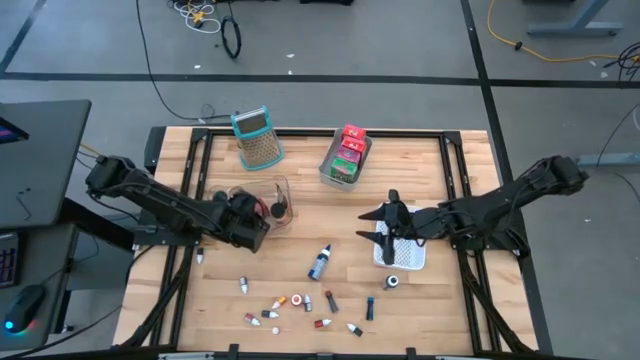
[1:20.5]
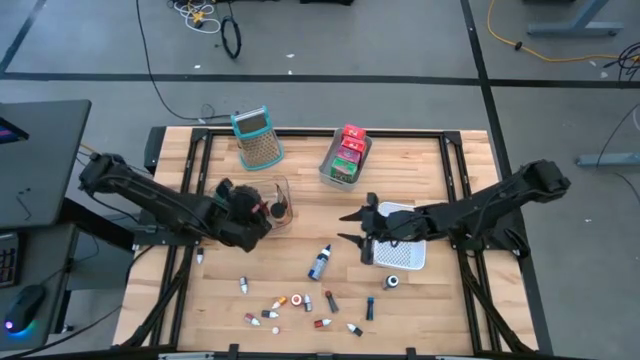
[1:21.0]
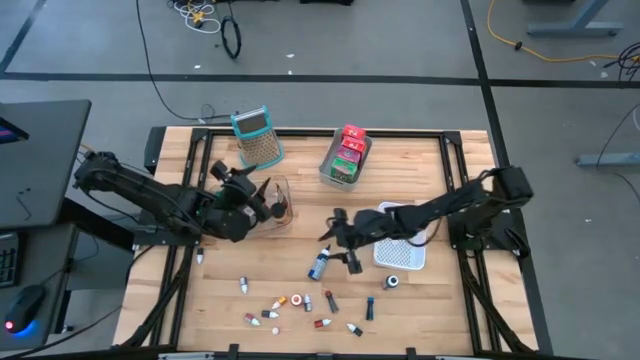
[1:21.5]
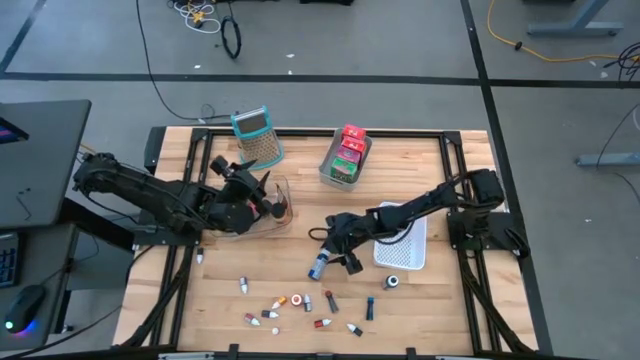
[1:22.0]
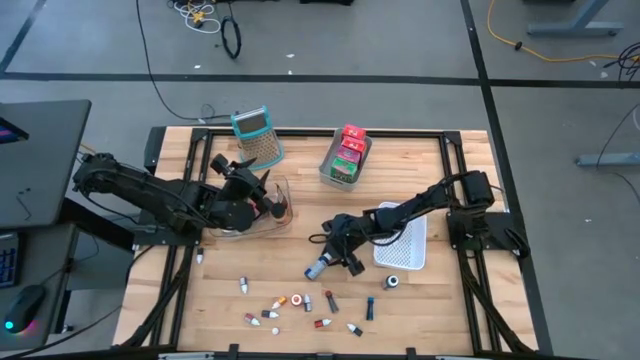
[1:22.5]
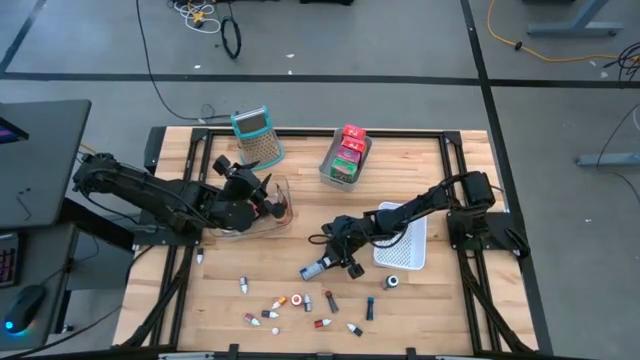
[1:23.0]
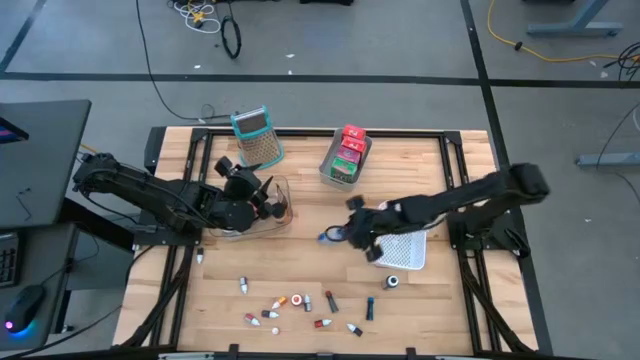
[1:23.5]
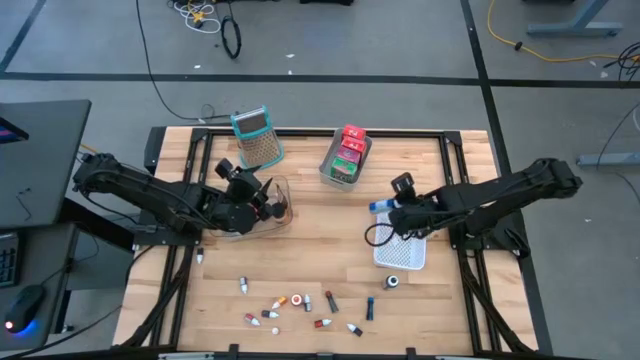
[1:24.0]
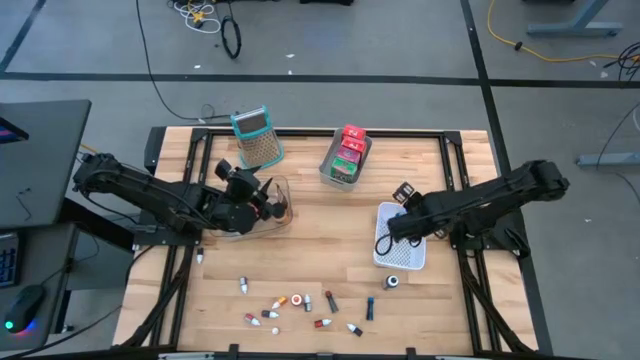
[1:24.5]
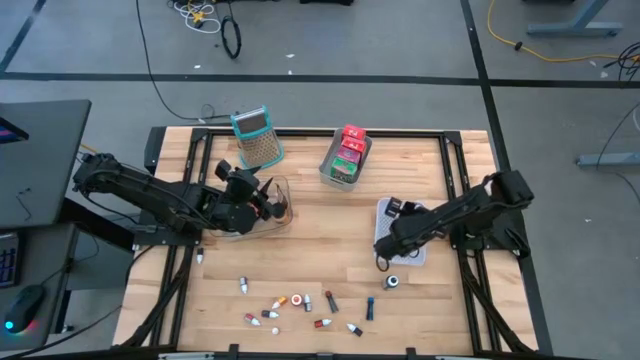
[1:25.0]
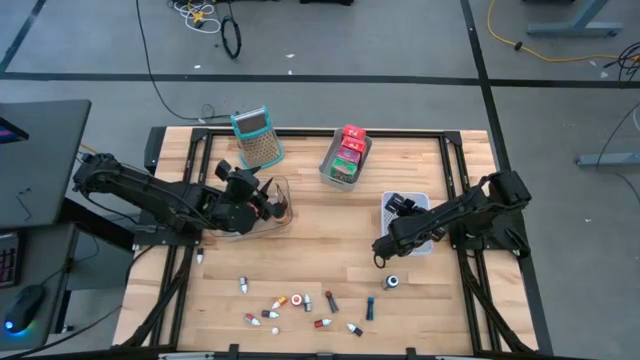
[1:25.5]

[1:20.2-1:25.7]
Task: Pick & Place Kitchen Items
Put the blue food coloring bottle into the white bin

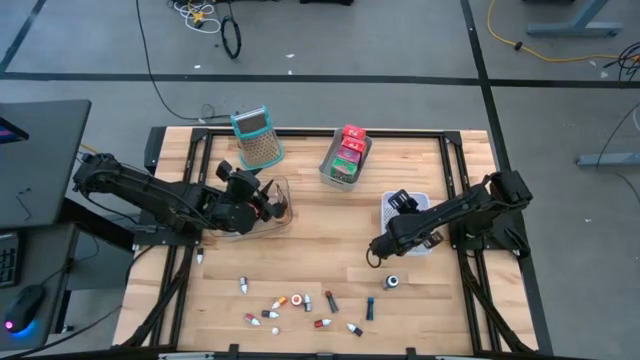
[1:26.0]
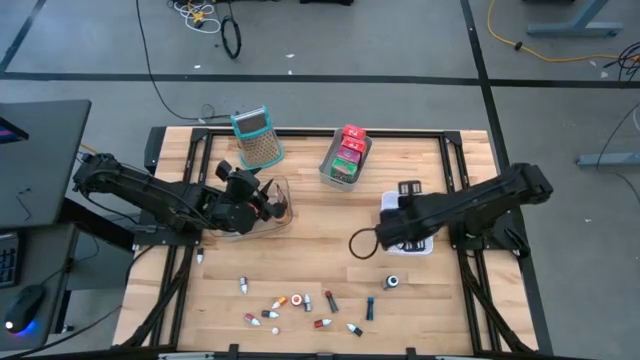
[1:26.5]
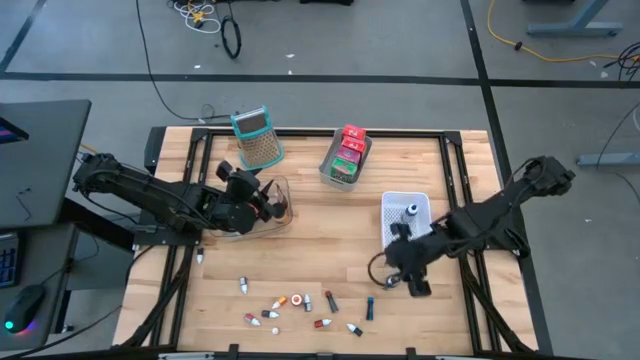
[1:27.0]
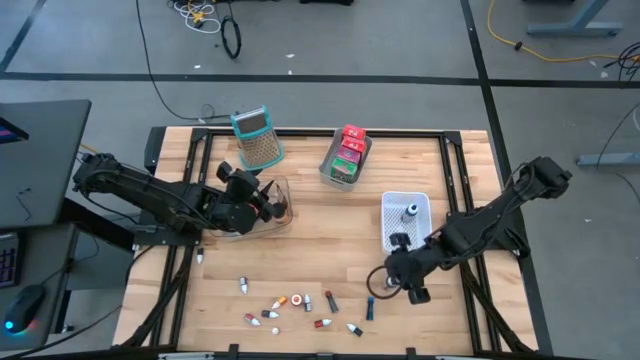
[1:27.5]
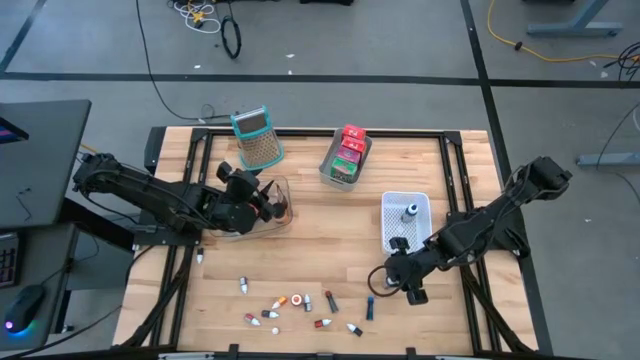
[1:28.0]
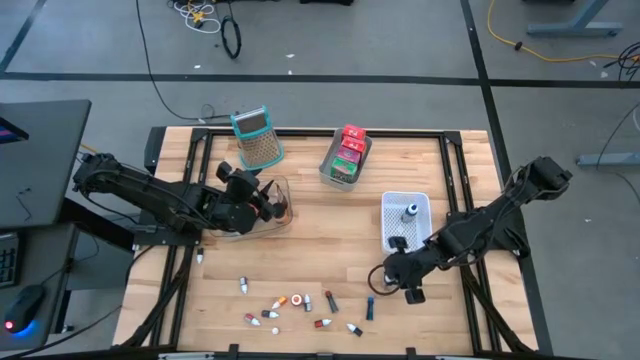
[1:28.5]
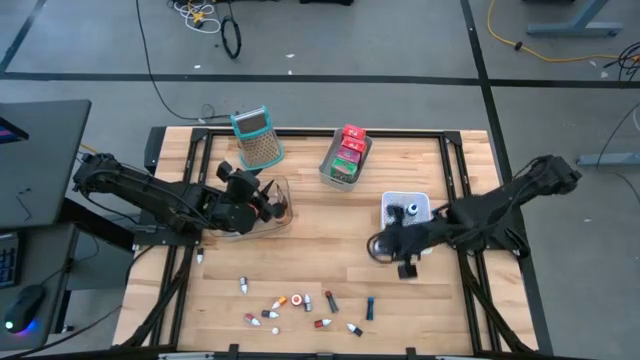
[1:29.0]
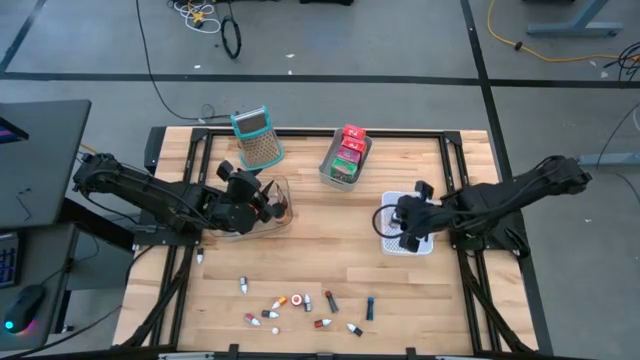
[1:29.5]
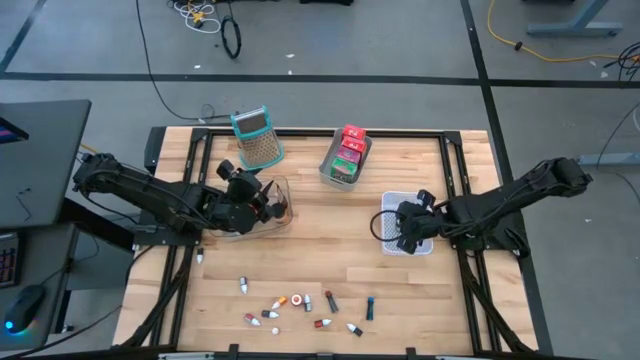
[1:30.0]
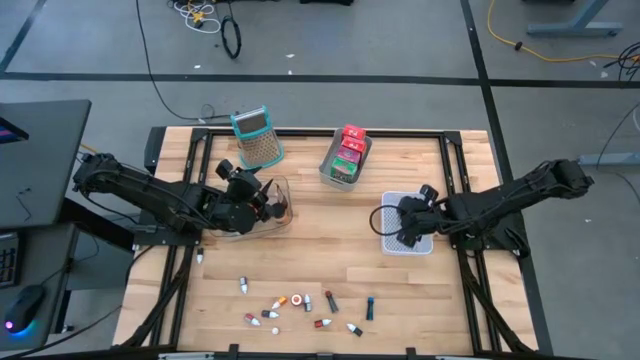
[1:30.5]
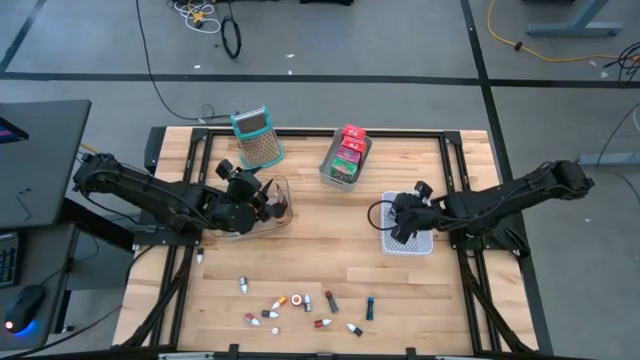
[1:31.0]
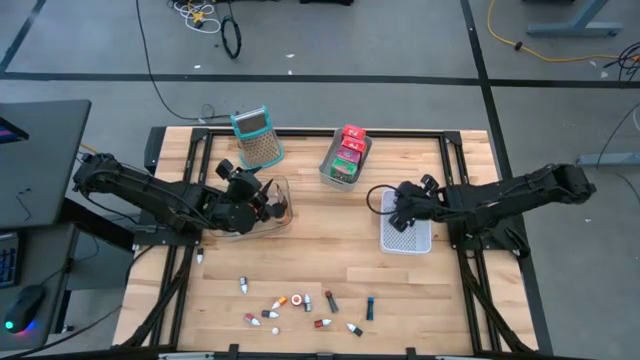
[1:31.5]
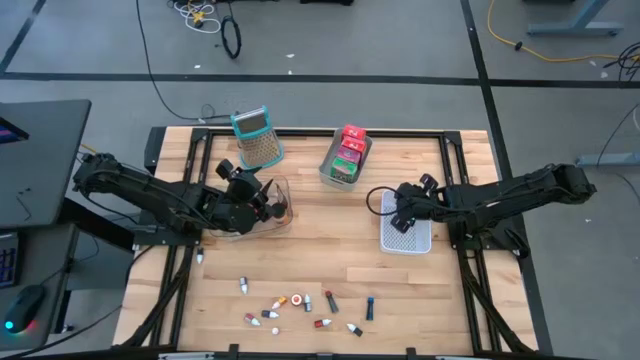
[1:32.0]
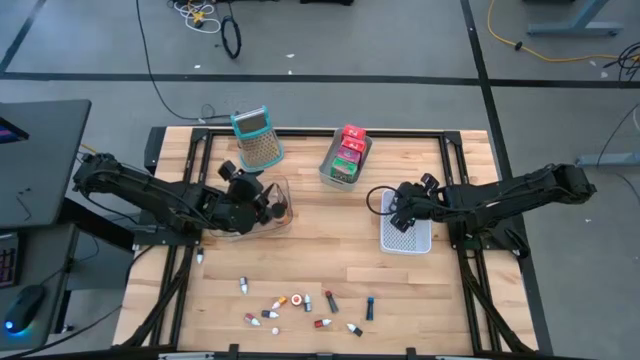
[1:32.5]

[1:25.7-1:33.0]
Put the black food coloring bottle into the white bin

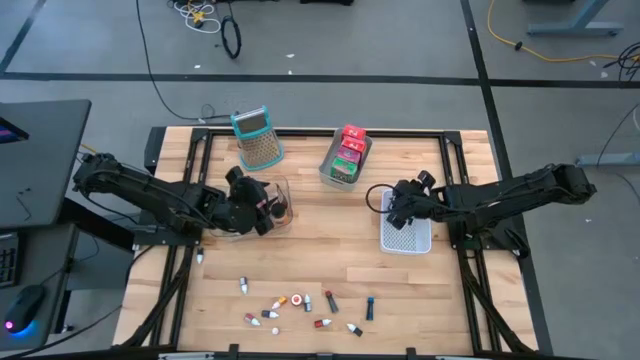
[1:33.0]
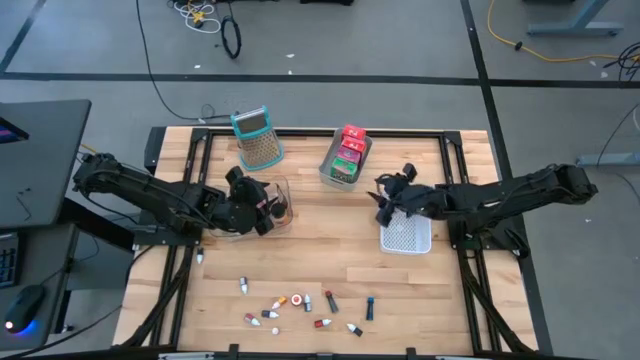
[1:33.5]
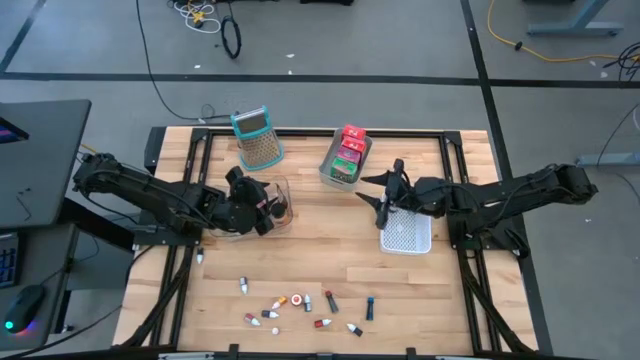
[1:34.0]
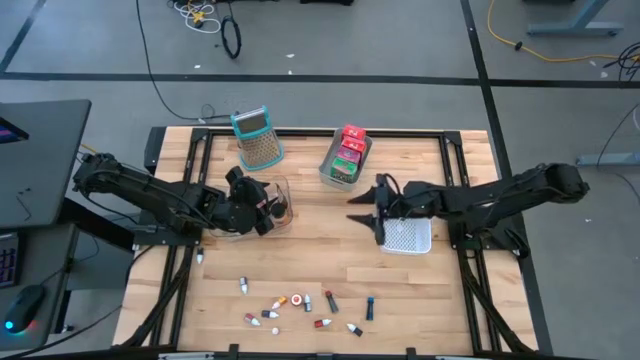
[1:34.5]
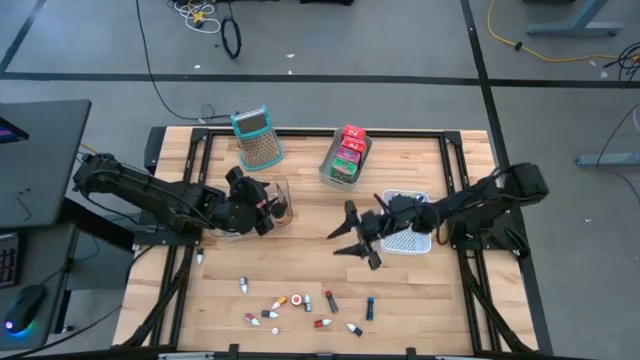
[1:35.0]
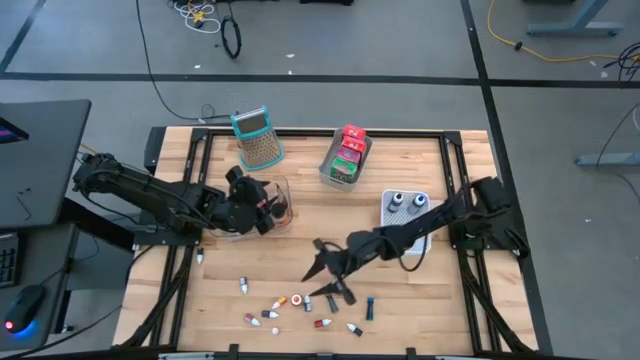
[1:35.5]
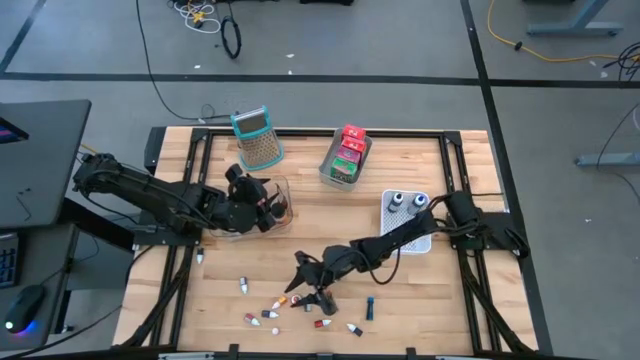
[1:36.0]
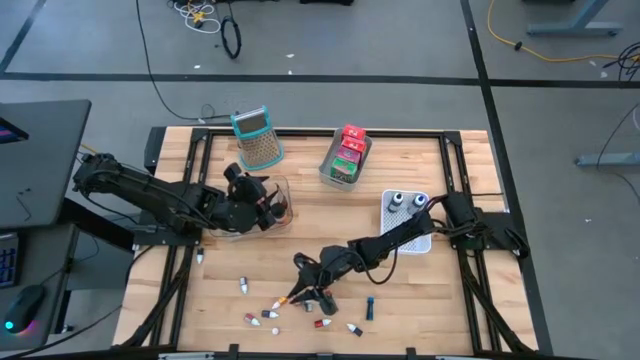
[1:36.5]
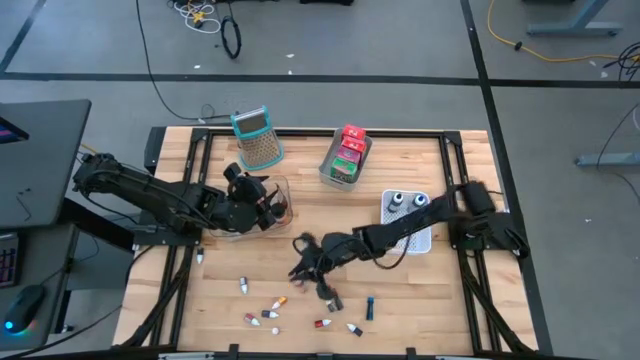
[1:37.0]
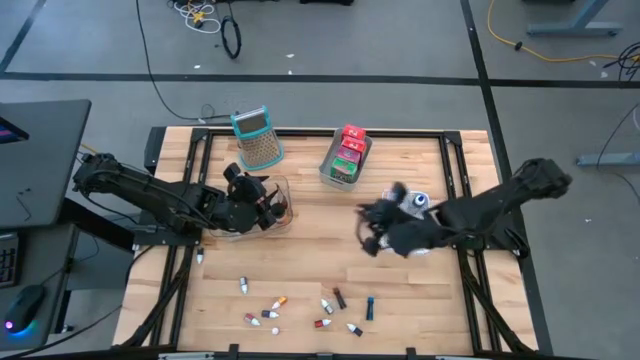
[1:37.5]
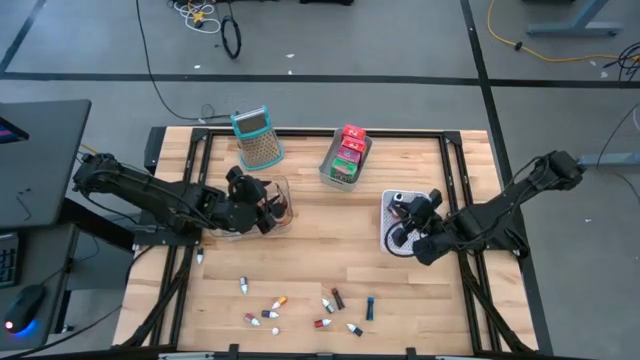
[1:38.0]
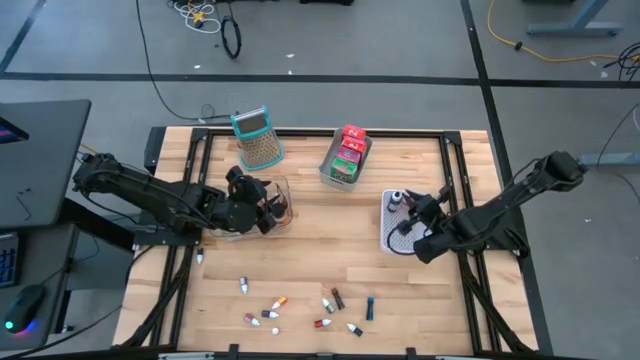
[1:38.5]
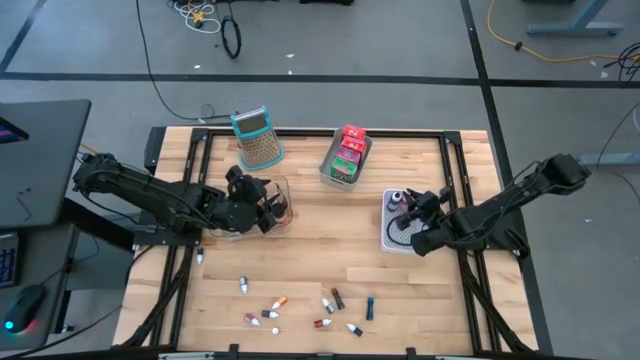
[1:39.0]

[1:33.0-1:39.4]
Put the orange food coloring bottle into the white bin

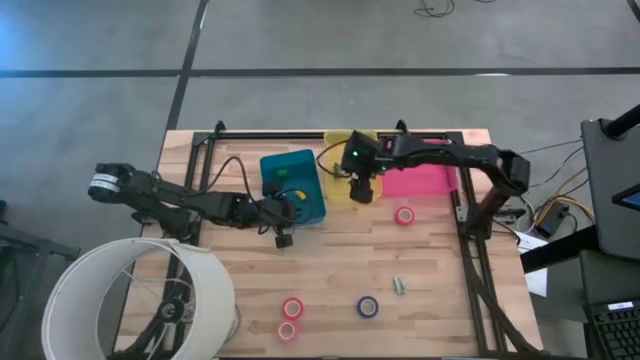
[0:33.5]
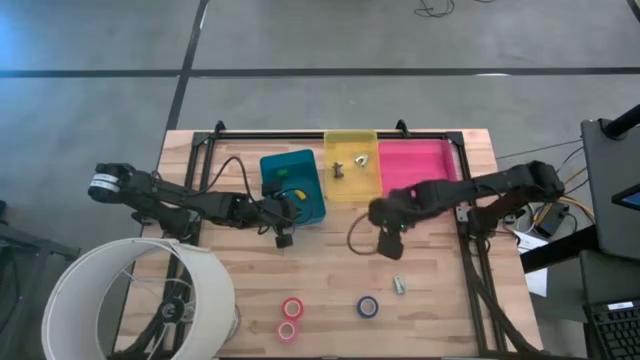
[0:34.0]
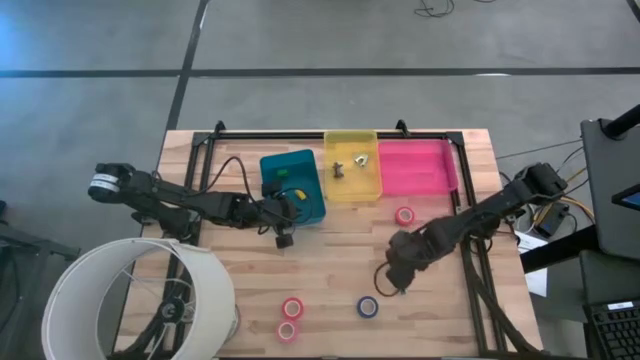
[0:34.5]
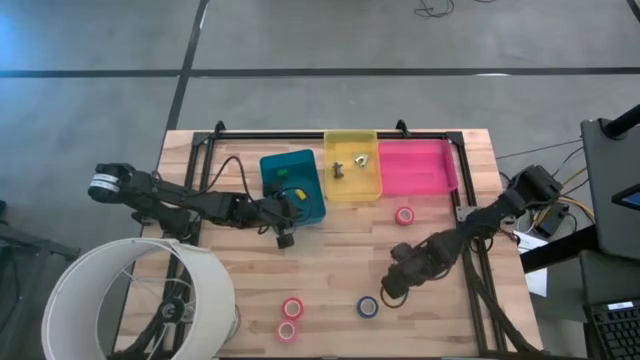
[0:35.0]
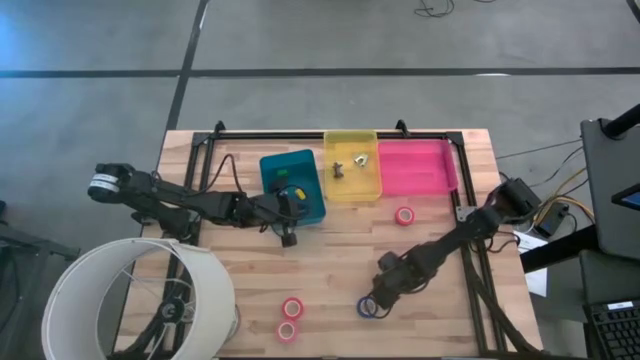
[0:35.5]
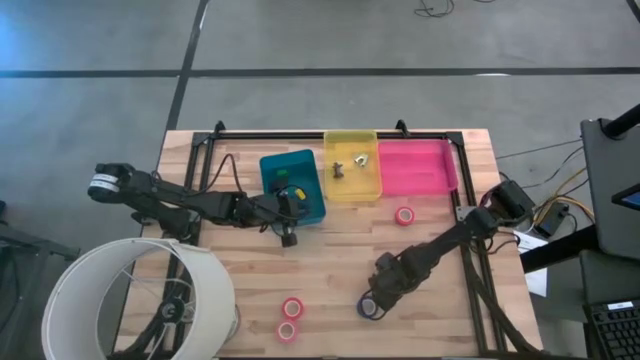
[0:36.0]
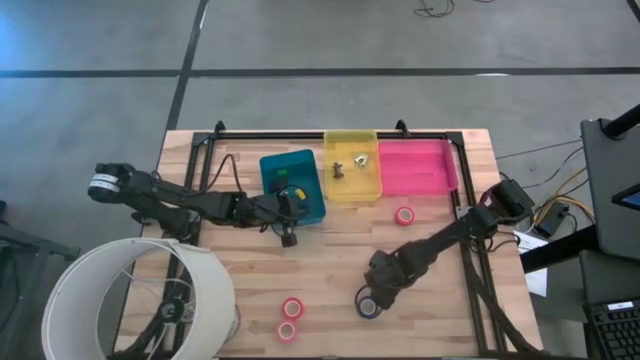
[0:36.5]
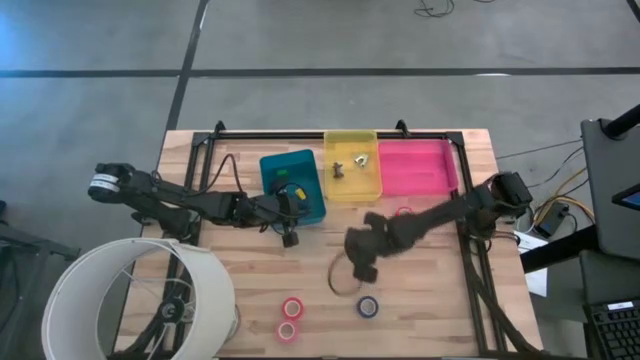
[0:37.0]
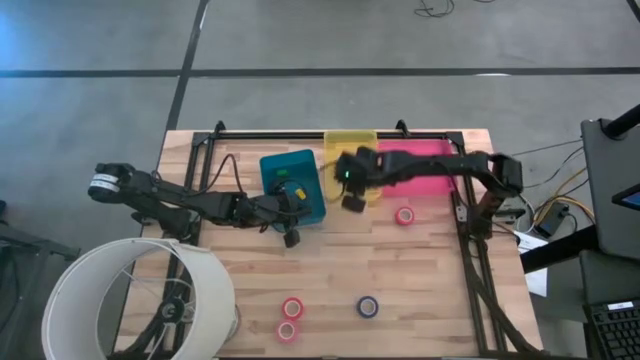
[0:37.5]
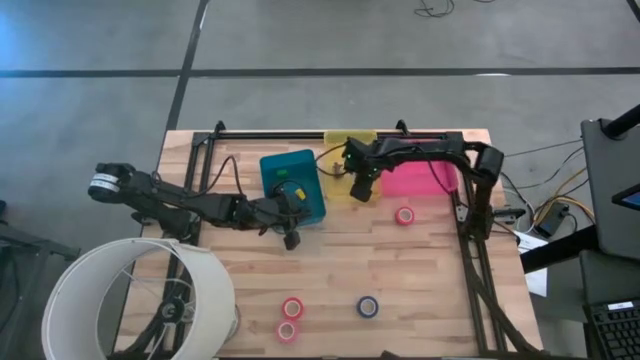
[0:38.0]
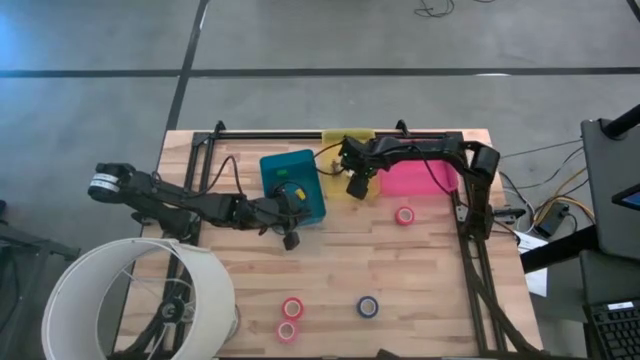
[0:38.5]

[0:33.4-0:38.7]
Task: Pick and place Stapler, Stapler remover, tape
Put the light blue staple remover into the yellow bin
